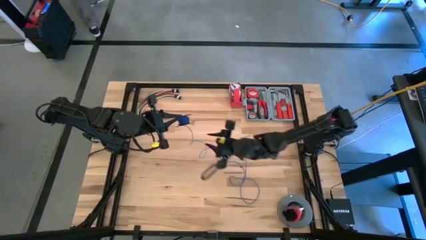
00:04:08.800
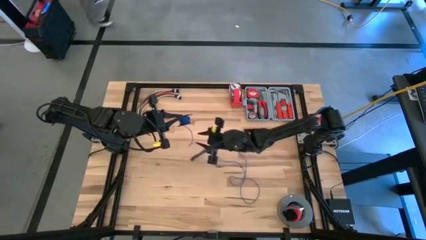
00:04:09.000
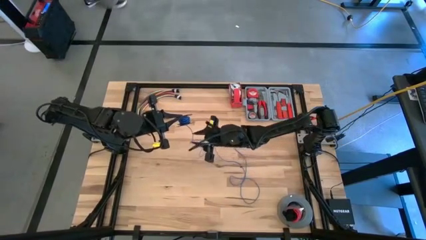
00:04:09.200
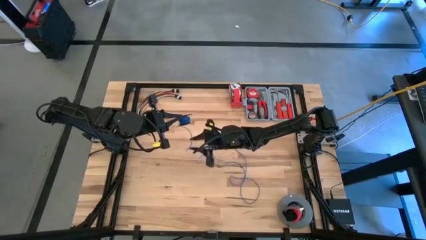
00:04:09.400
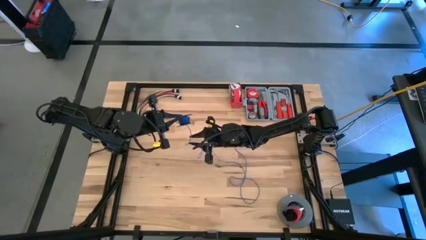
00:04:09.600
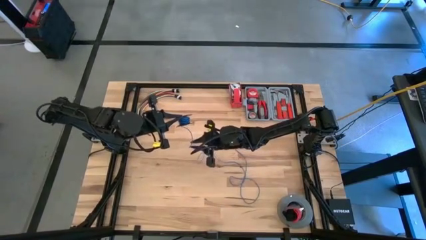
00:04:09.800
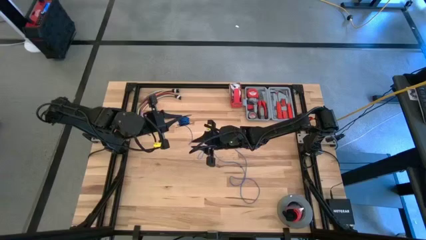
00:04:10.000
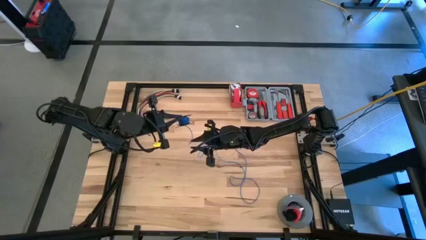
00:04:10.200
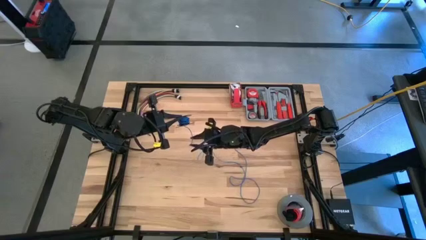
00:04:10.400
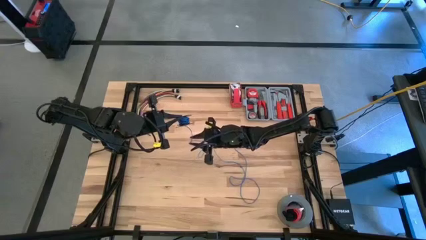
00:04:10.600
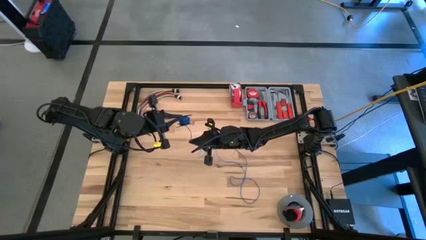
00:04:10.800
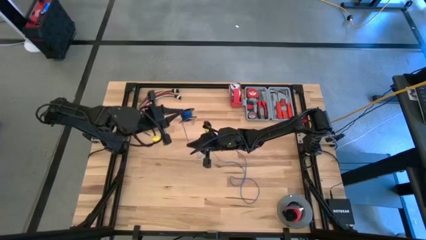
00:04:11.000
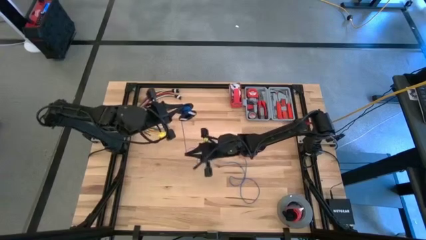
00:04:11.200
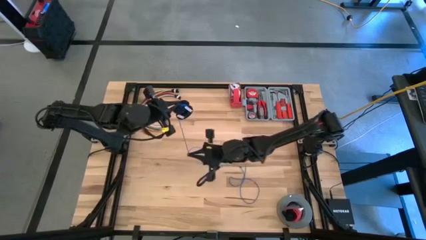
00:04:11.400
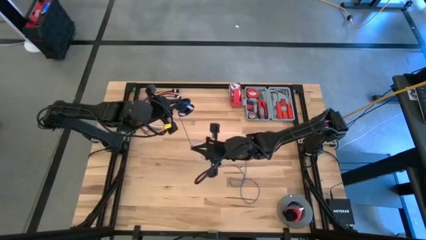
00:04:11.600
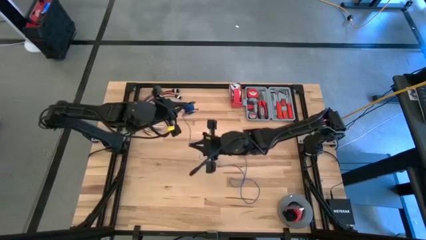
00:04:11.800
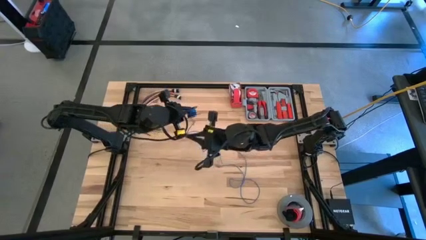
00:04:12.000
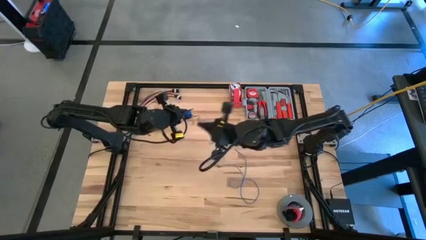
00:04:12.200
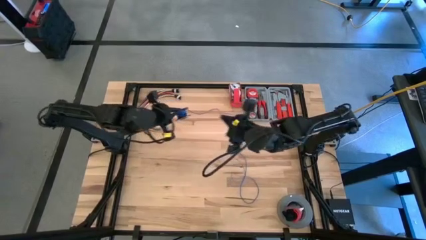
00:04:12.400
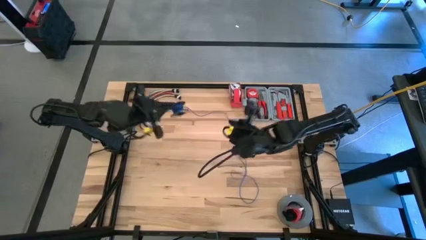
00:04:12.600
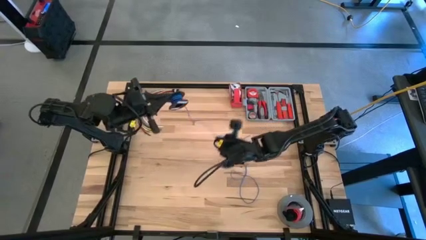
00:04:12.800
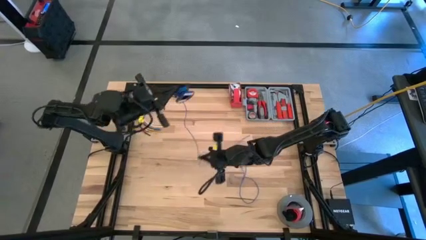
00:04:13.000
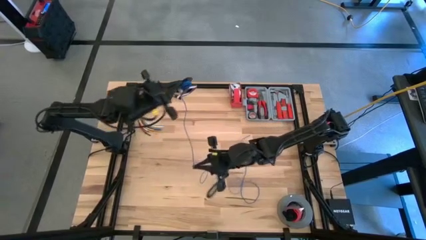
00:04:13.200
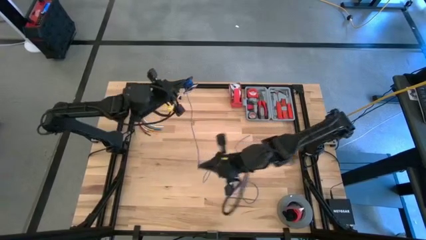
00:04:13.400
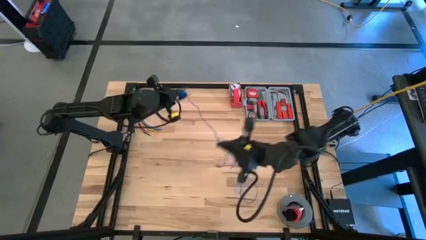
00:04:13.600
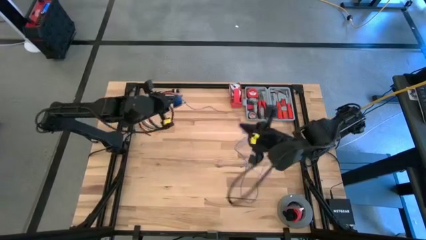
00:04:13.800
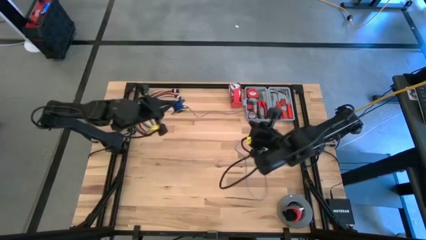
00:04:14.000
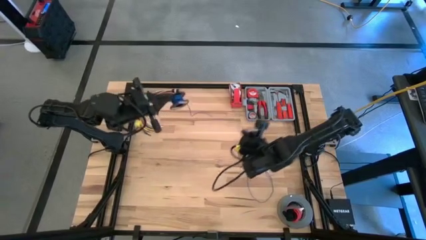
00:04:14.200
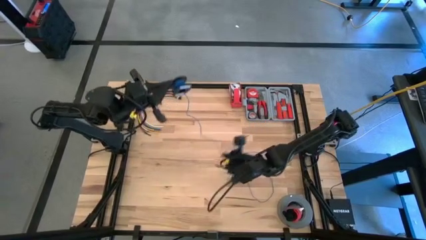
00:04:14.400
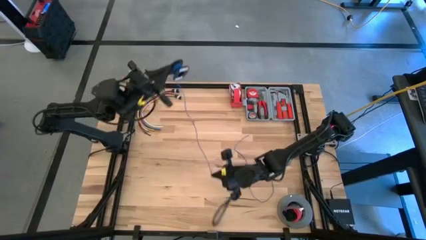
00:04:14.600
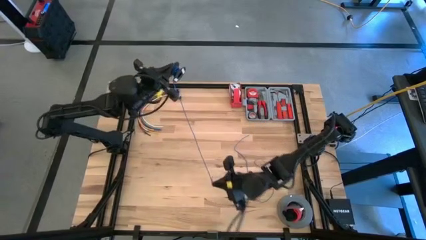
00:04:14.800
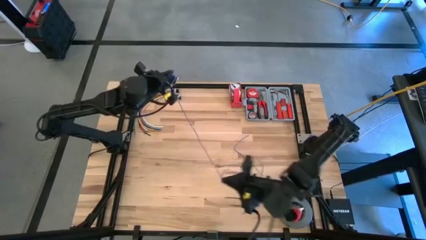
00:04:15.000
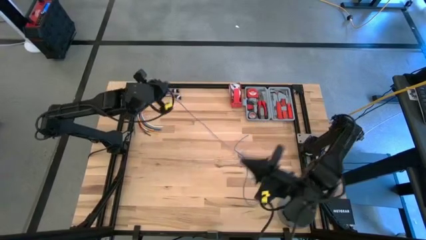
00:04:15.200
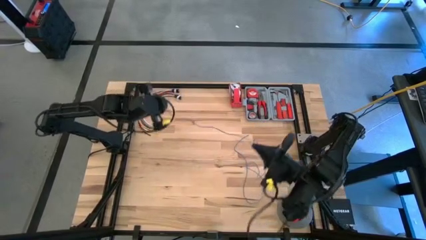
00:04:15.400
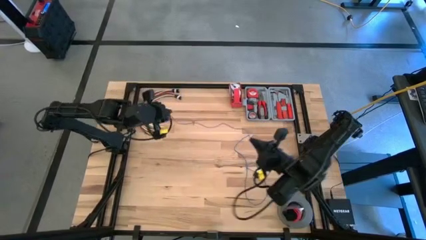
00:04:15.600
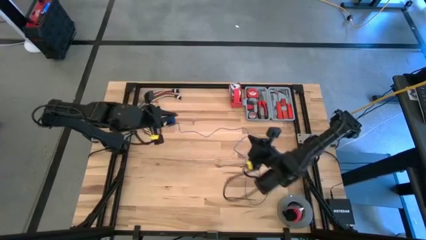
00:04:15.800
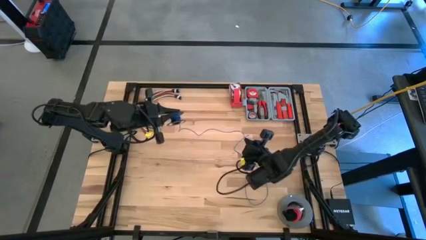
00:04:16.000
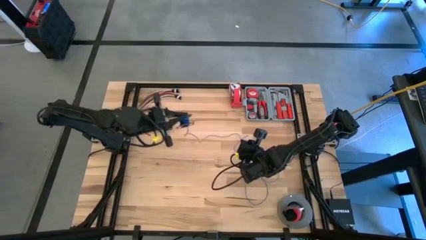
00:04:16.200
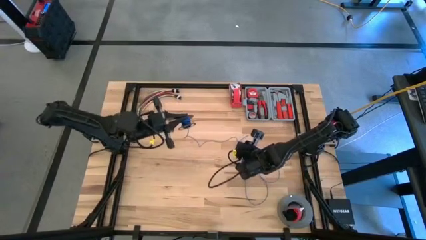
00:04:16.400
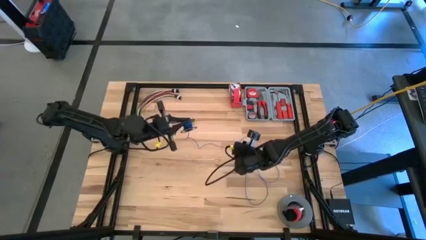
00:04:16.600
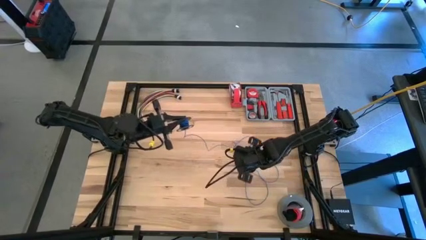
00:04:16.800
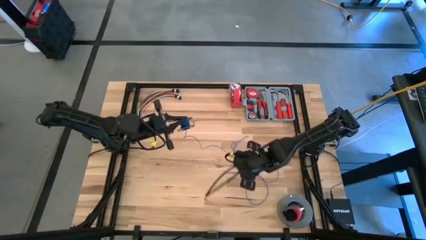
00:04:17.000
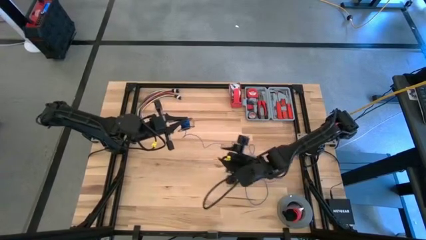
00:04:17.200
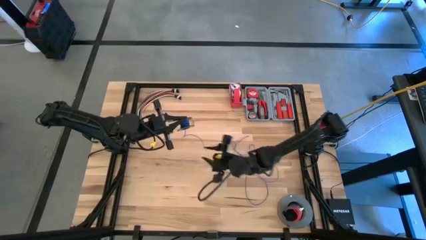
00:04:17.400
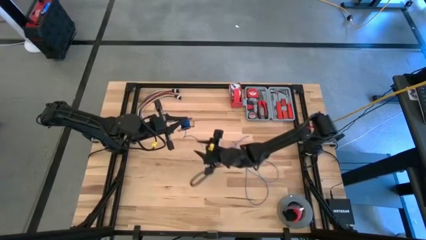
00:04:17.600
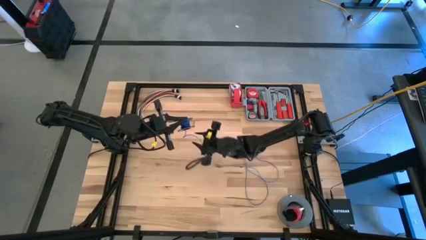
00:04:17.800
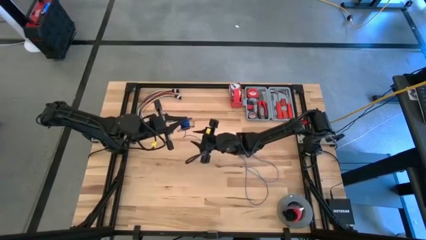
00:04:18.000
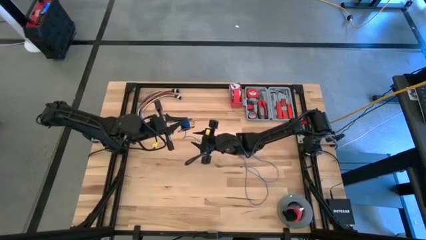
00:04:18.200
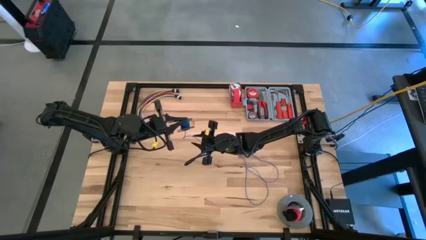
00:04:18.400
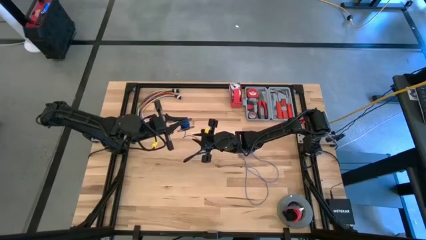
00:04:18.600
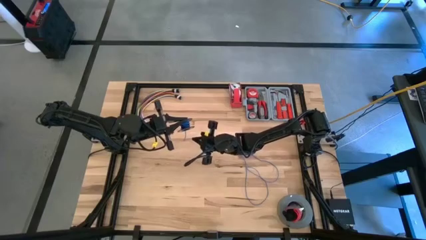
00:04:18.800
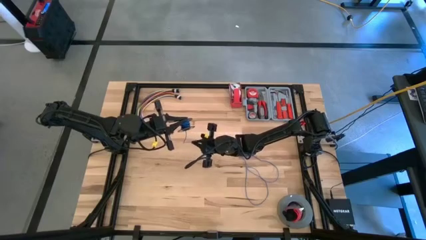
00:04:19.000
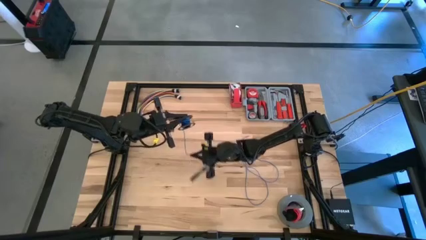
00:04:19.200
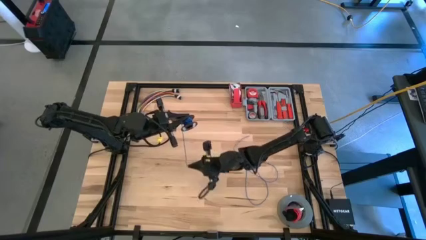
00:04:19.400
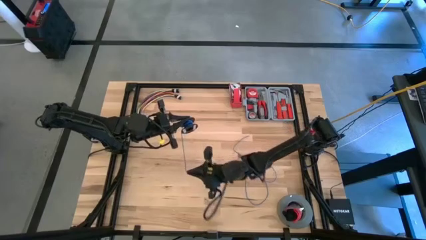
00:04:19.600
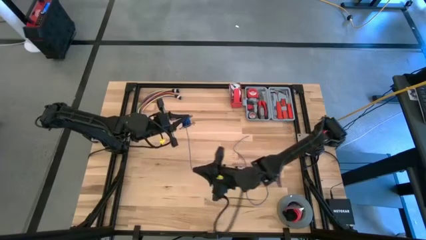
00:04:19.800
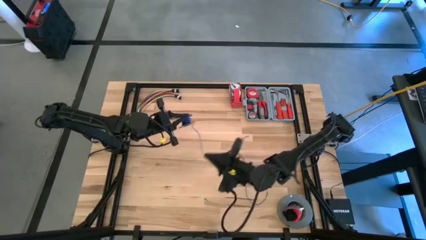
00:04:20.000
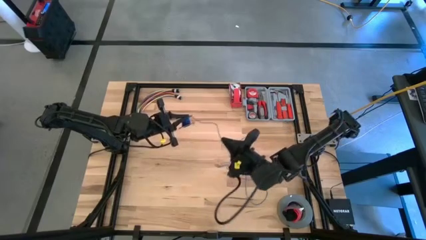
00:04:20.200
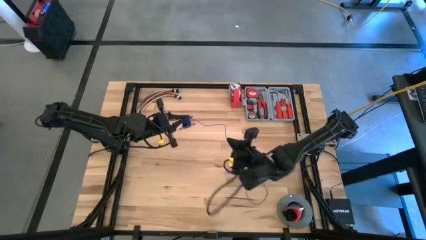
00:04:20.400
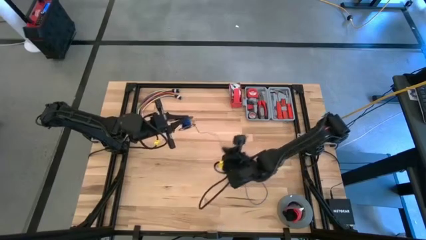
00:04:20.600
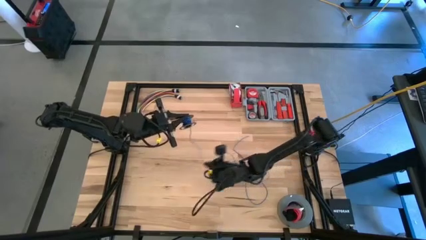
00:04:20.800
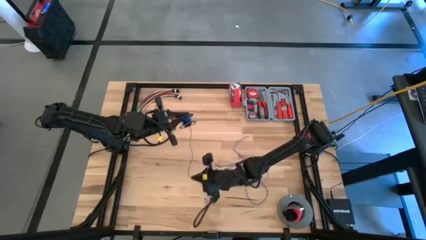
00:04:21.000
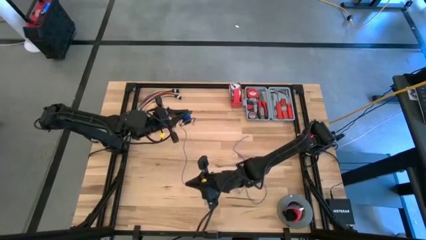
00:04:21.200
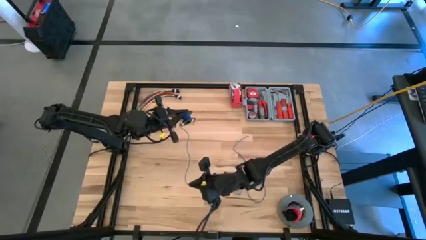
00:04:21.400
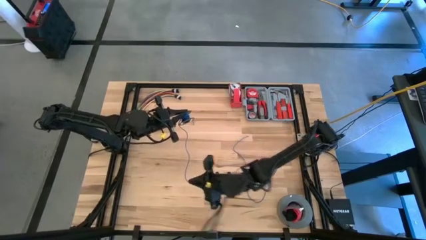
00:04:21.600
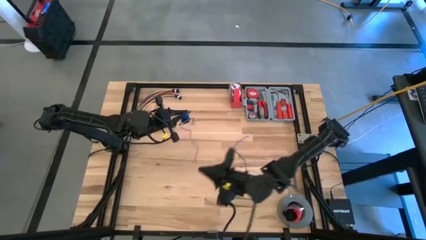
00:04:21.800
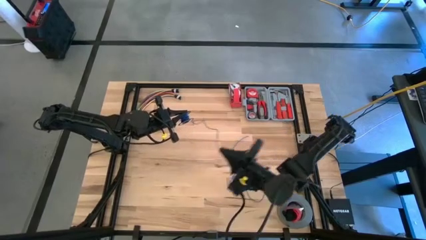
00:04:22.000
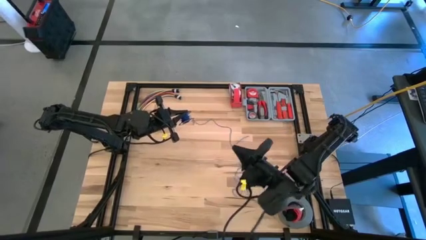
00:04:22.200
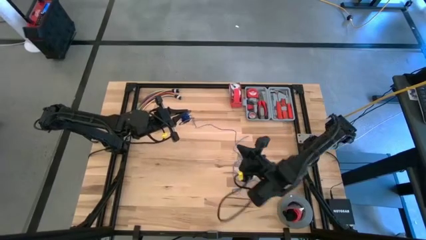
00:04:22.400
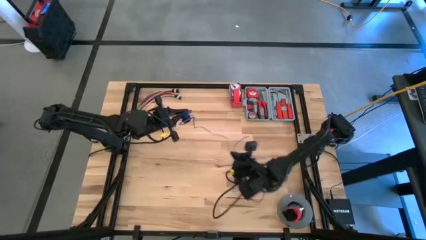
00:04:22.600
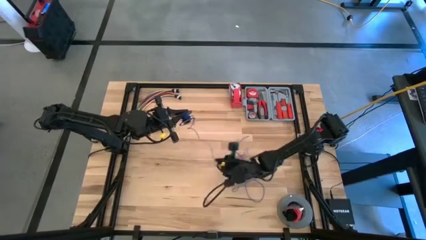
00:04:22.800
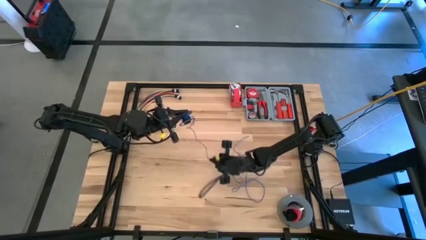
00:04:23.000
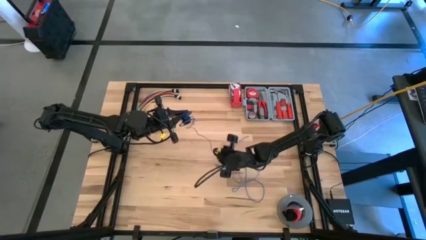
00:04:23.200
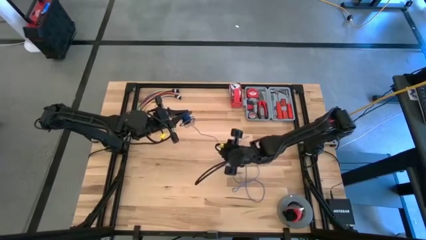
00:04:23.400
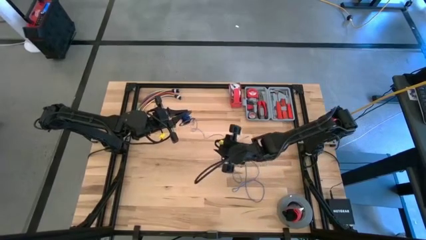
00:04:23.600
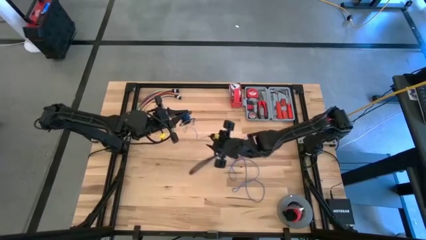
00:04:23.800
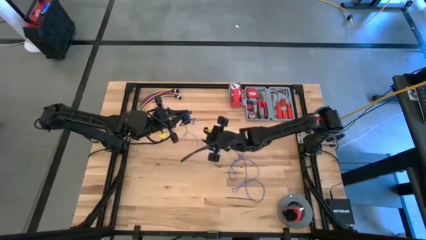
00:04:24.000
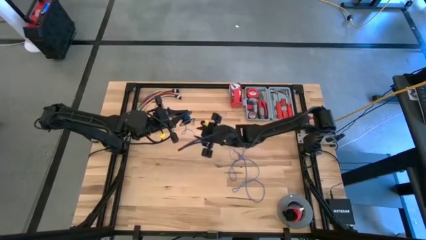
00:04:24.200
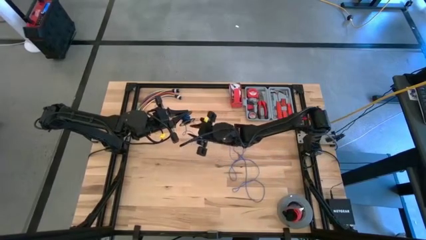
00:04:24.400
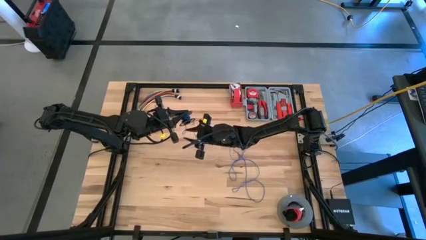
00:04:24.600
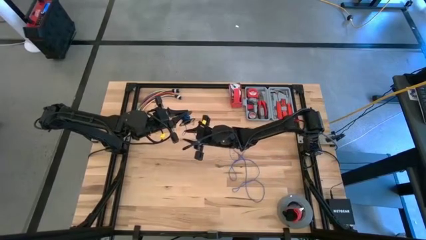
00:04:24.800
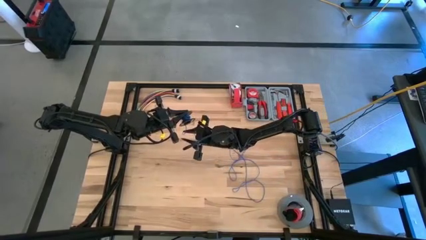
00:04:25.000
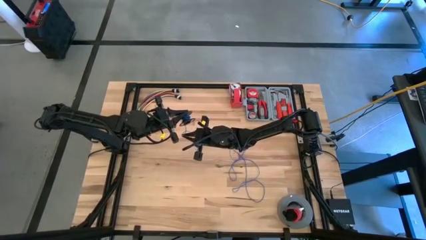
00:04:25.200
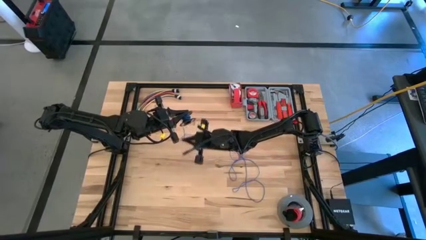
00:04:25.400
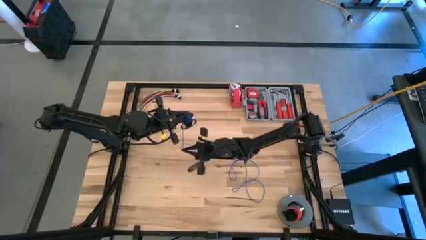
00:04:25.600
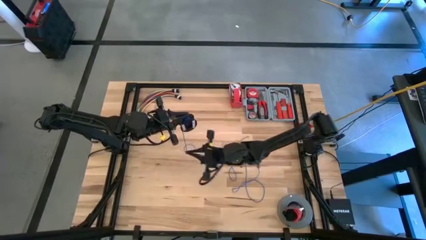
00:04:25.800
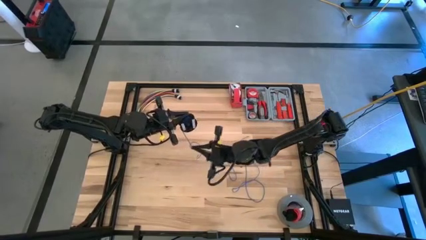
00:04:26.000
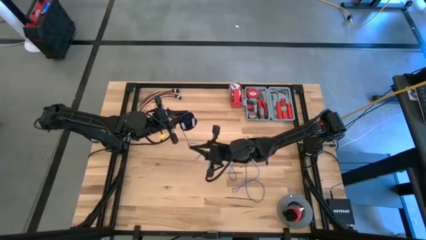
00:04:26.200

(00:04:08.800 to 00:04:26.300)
Task: Coil cords
Uncoil the blue wire from the black spool
